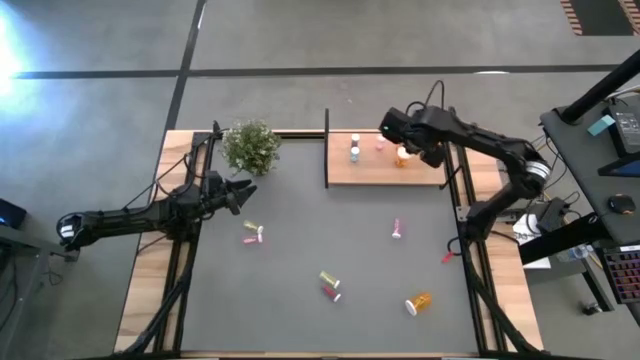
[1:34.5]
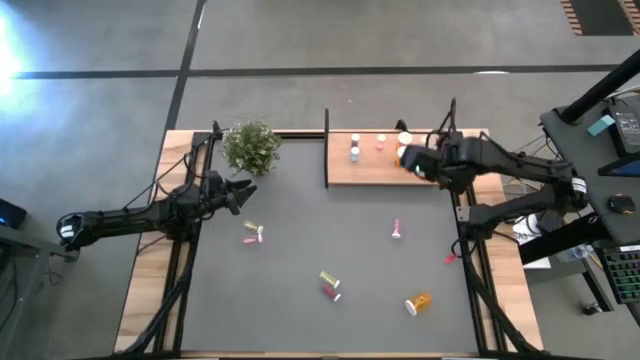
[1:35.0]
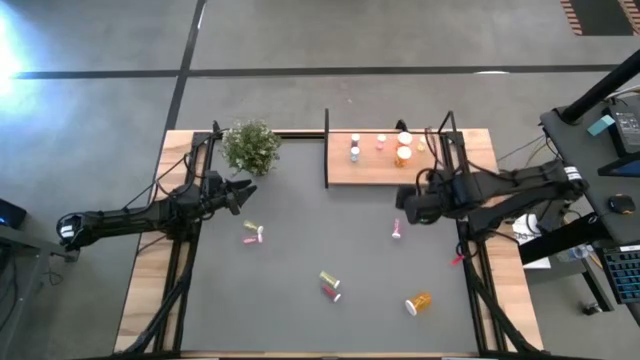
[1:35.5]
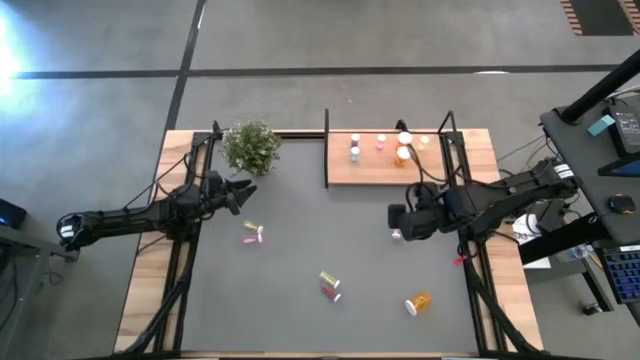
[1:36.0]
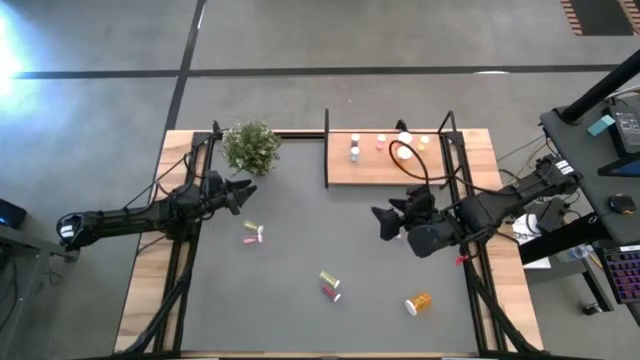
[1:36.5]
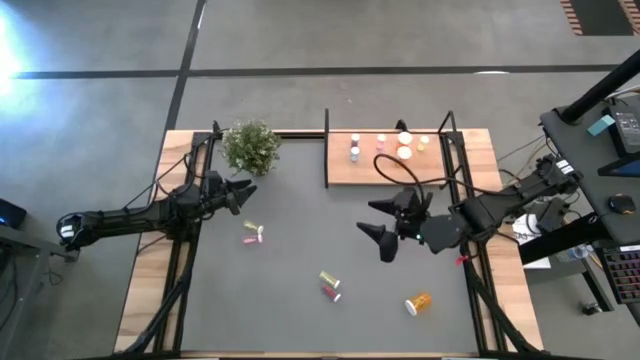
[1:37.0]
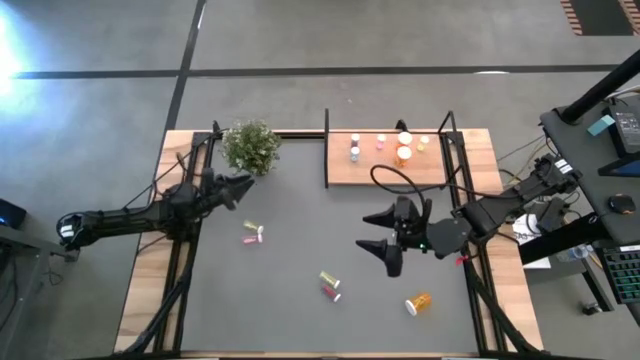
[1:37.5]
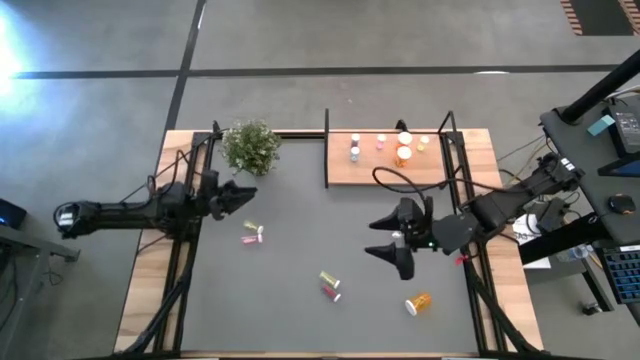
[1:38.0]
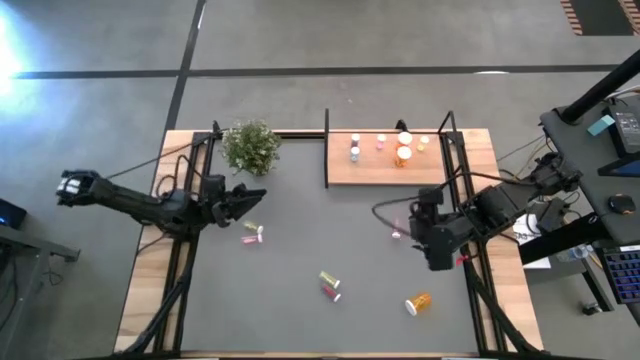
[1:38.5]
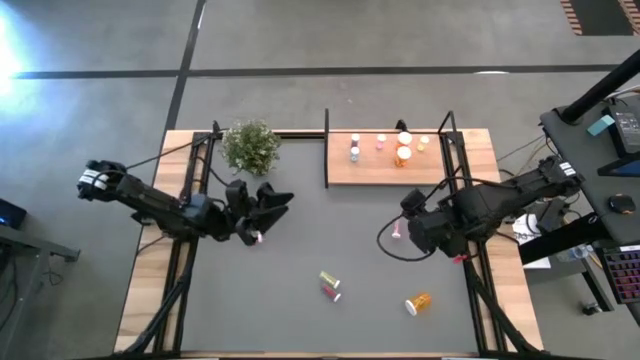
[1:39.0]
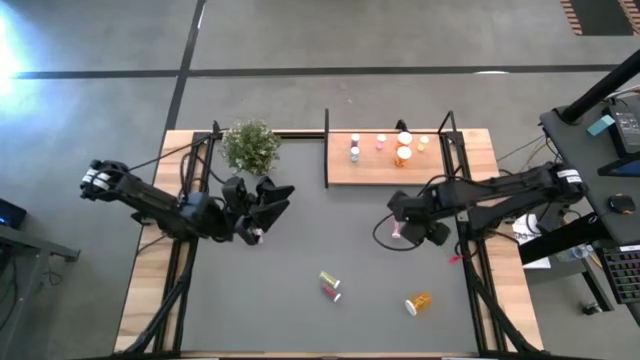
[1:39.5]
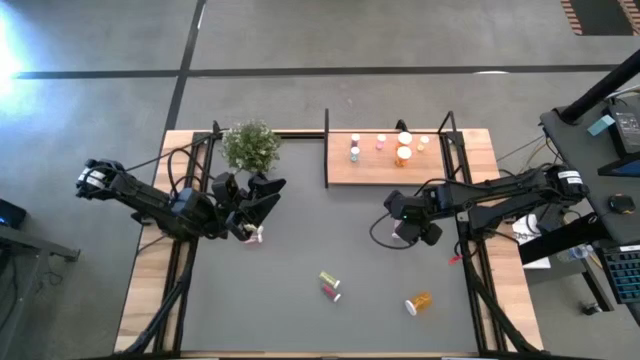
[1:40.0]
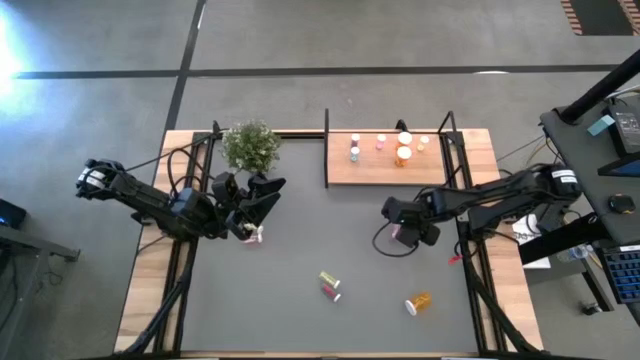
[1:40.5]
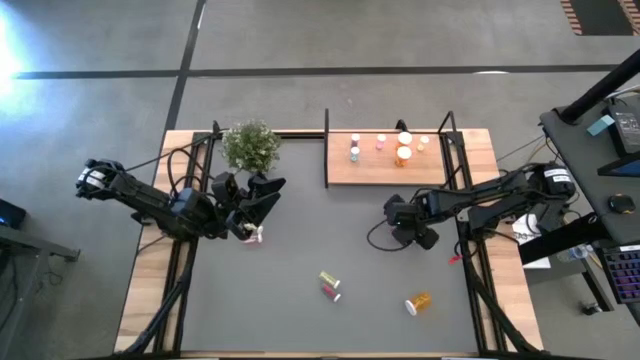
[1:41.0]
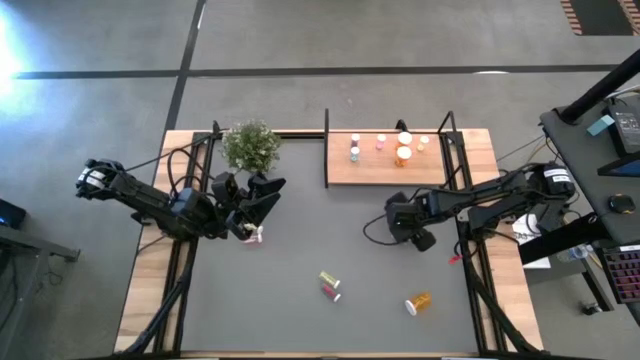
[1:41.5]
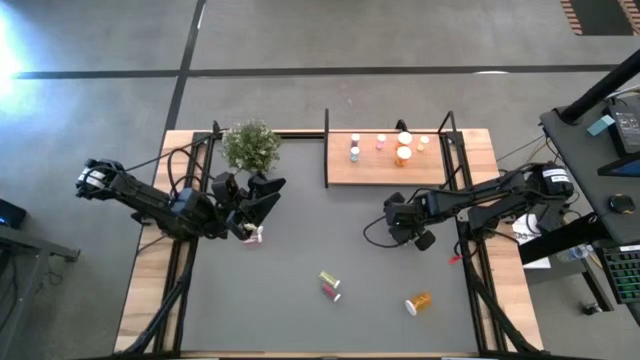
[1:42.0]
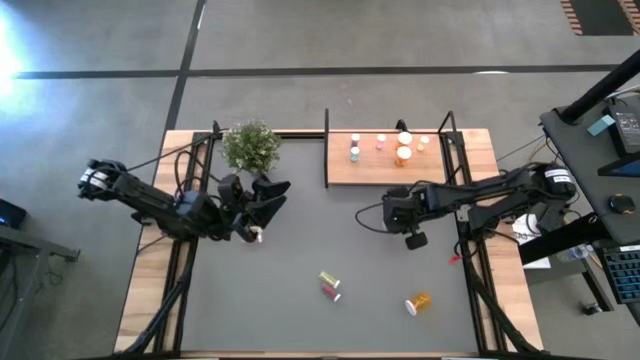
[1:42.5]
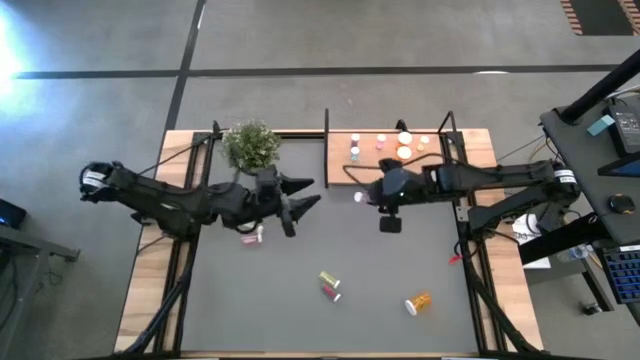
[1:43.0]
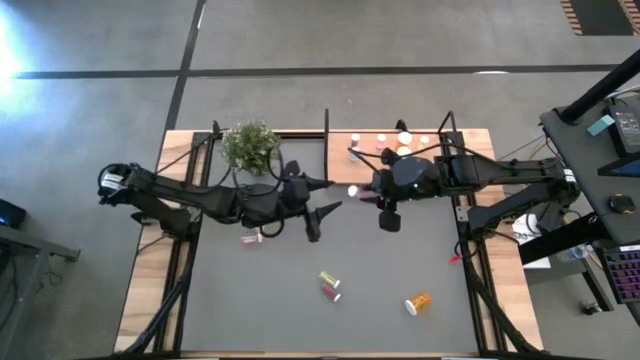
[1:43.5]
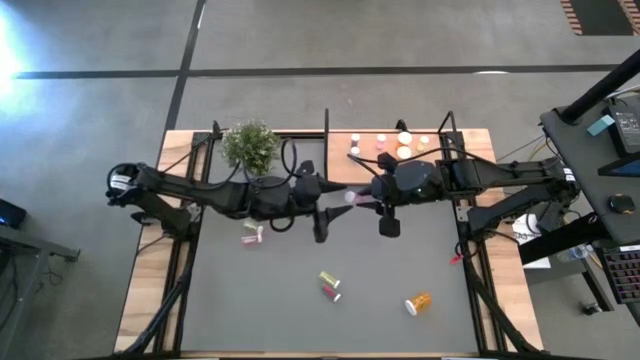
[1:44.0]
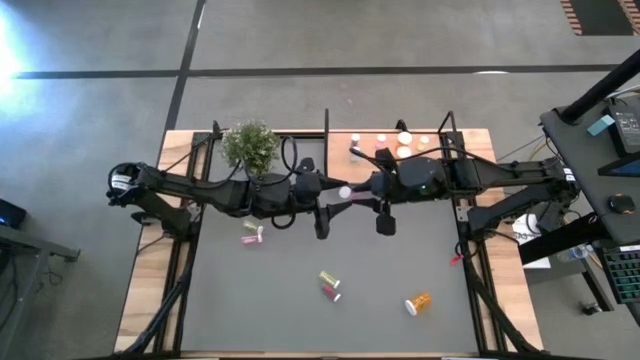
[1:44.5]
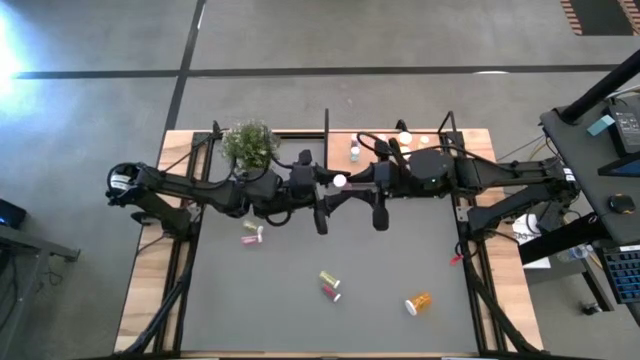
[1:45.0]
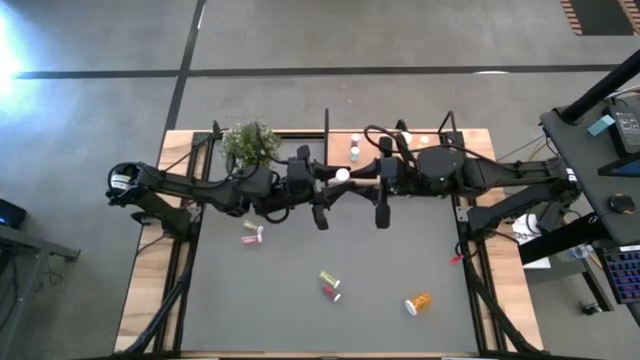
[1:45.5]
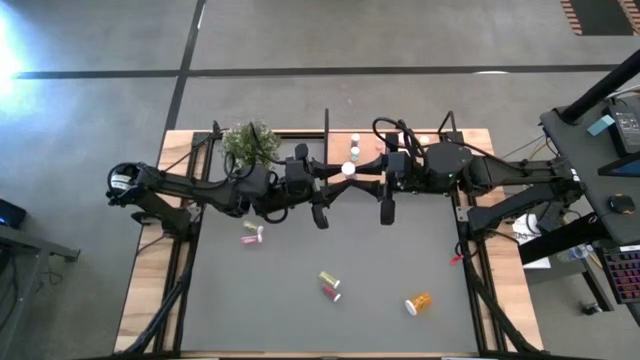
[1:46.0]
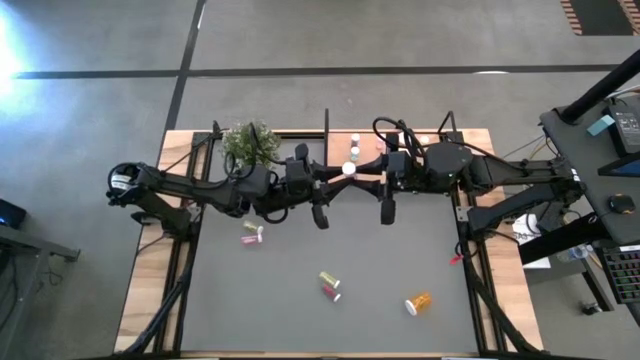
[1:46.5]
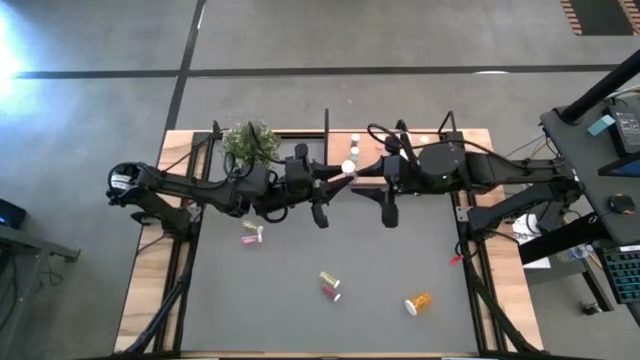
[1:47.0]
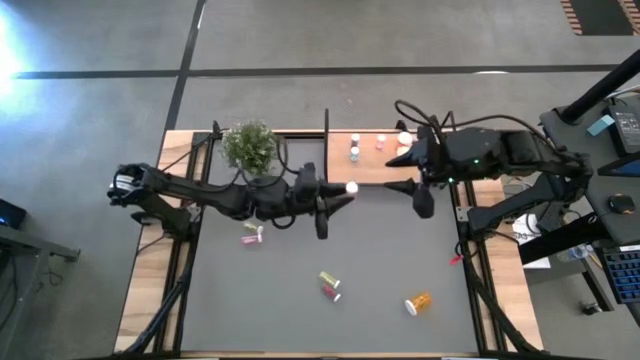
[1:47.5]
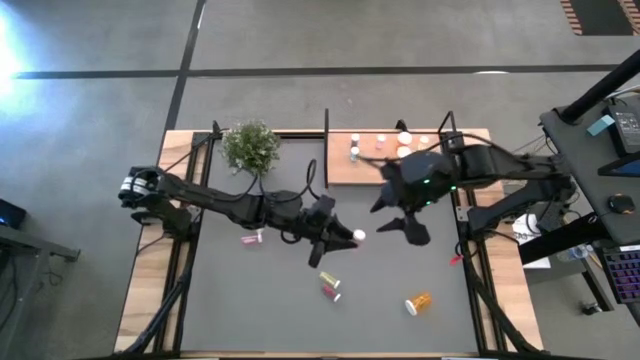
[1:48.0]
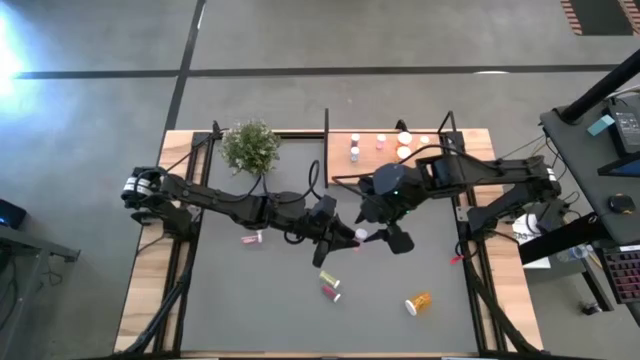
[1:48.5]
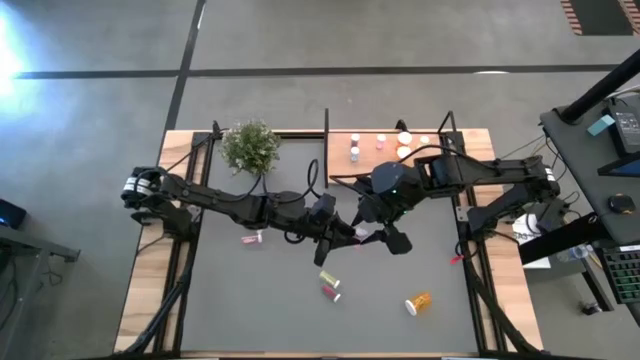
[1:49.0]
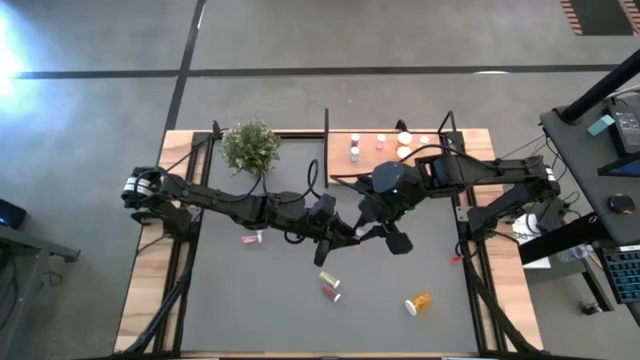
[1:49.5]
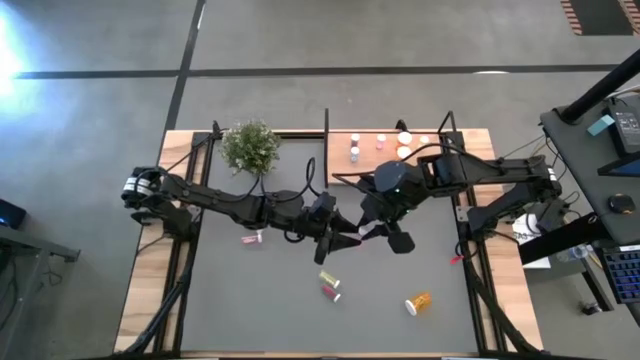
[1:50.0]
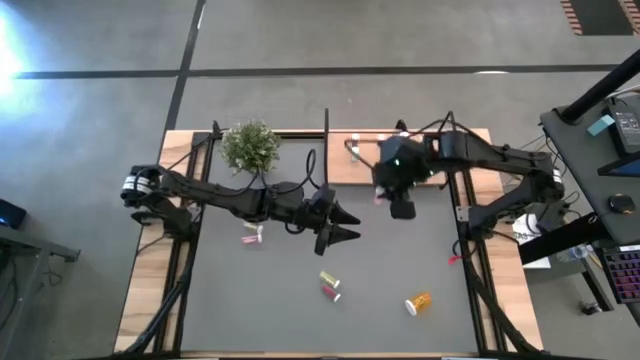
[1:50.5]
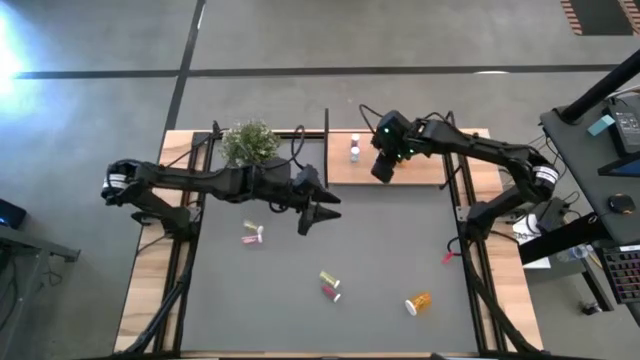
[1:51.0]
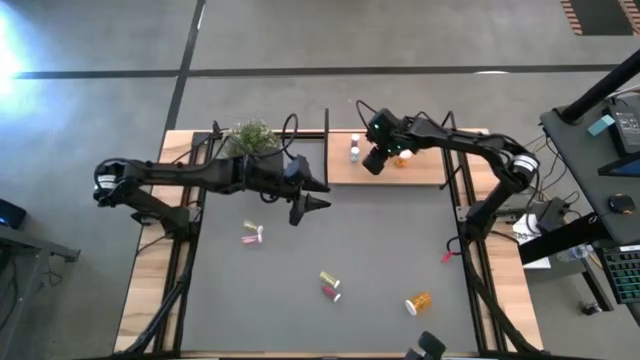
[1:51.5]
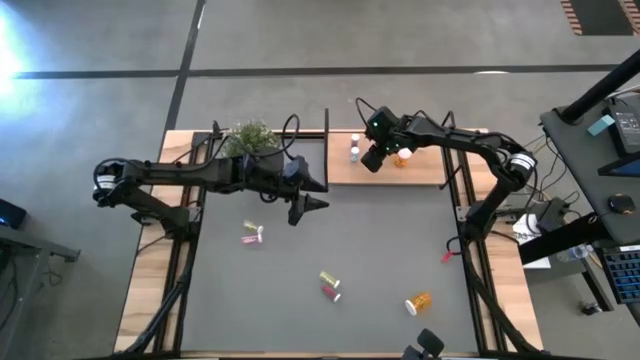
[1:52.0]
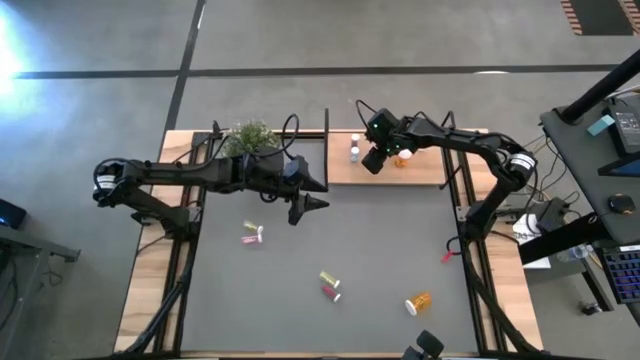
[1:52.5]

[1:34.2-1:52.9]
Task: Pick and place medicine bottles onto shelf by color
Put the right pink pill bottle on the shelf aligned with the other pink pill bottle

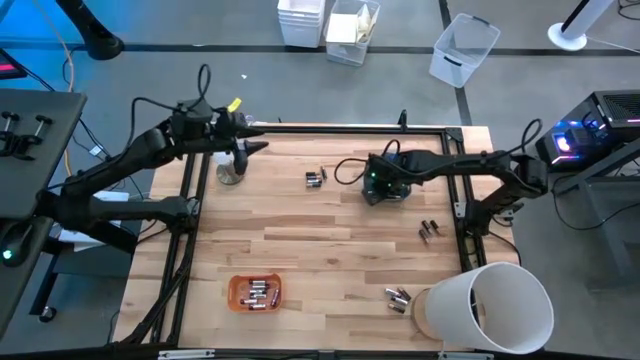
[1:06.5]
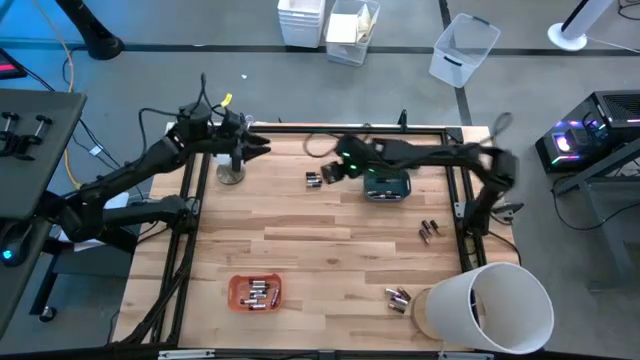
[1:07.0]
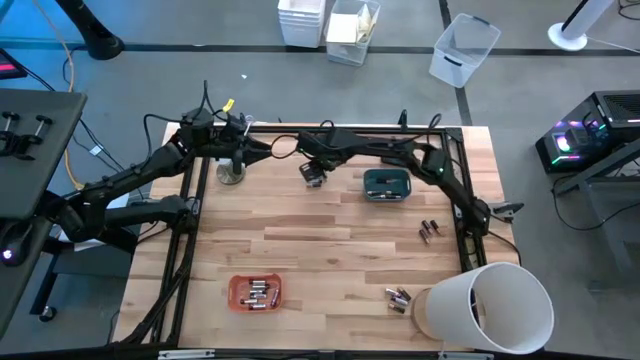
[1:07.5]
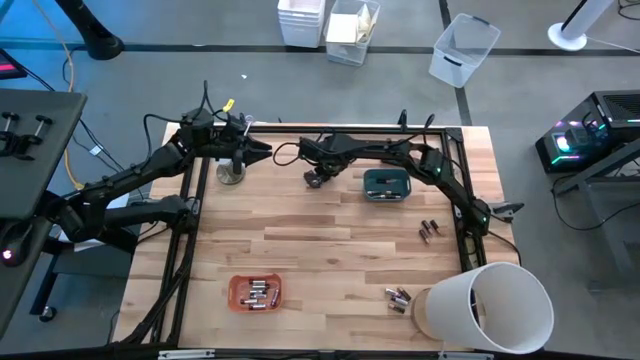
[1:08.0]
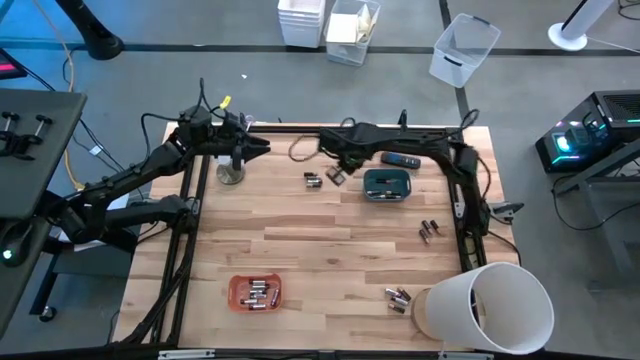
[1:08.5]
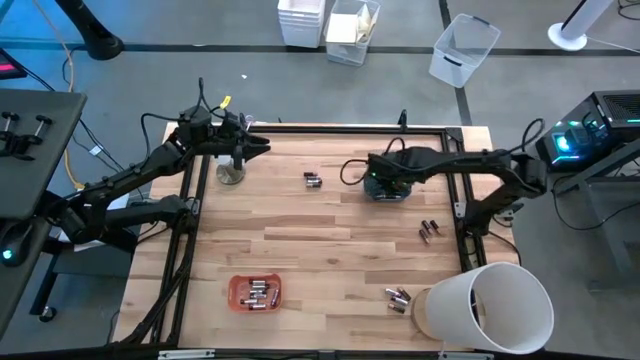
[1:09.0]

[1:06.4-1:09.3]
Task: Sort batteries
Put the black battery into the blue bin

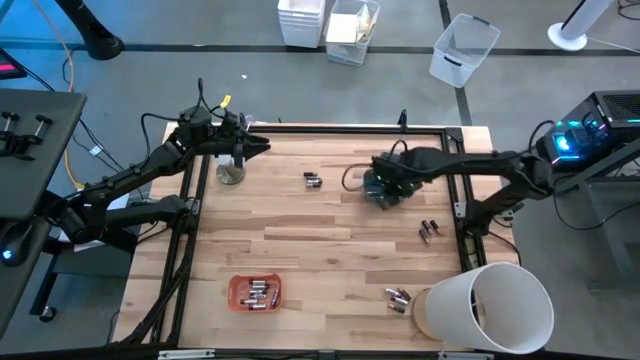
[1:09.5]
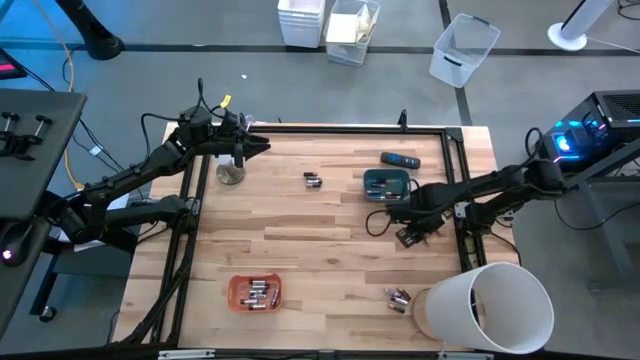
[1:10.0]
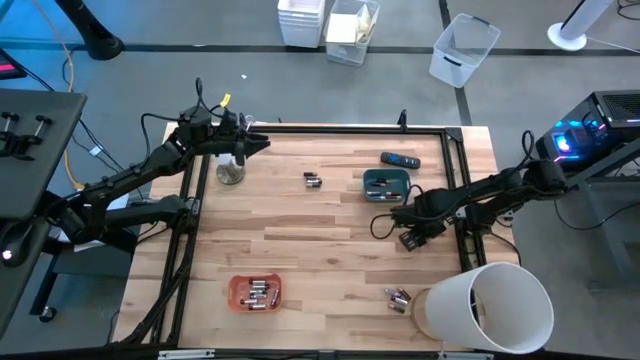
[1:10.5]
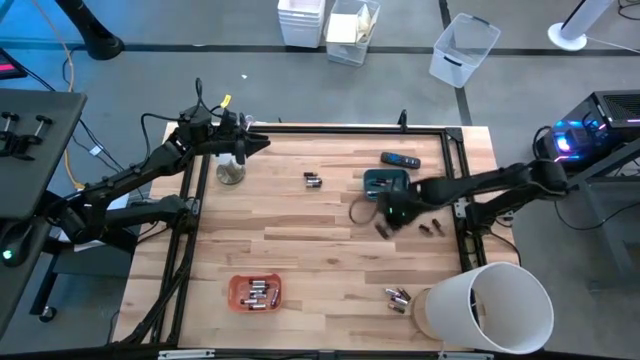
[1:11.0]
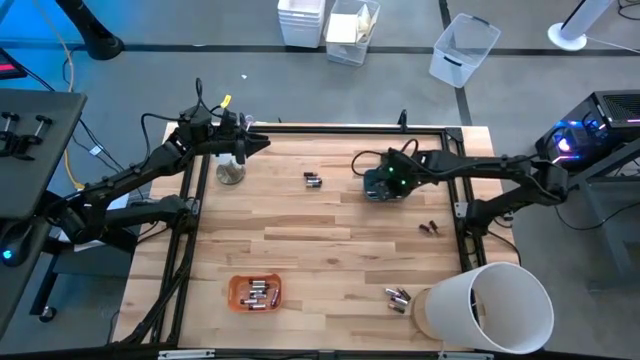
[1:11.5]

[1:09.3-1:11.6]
Put the black battery into the blue bin
